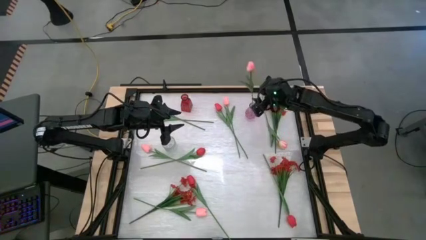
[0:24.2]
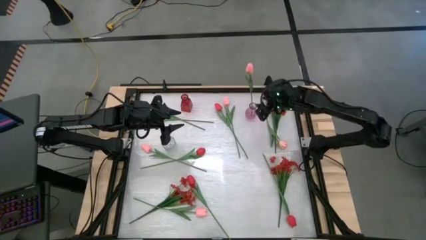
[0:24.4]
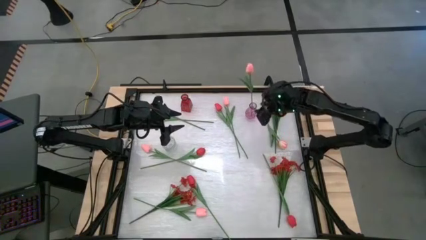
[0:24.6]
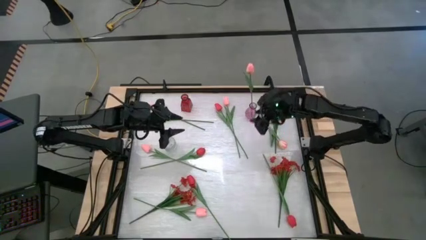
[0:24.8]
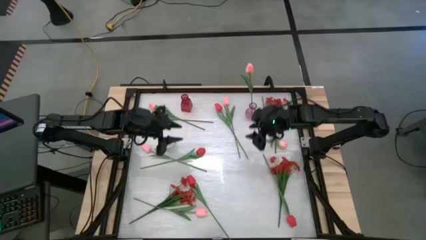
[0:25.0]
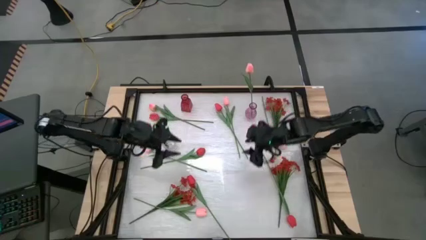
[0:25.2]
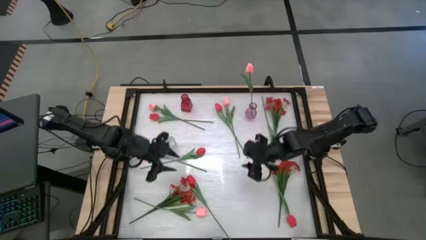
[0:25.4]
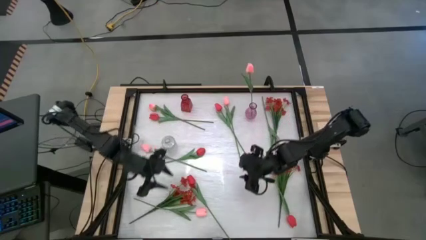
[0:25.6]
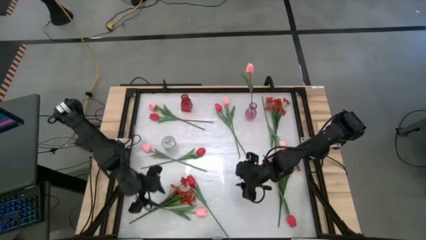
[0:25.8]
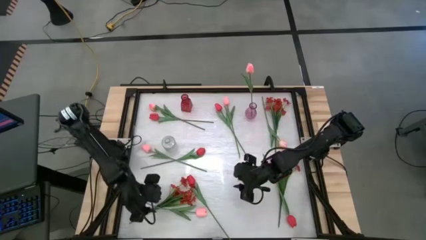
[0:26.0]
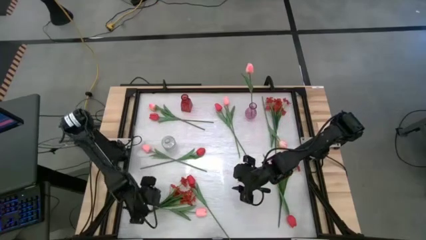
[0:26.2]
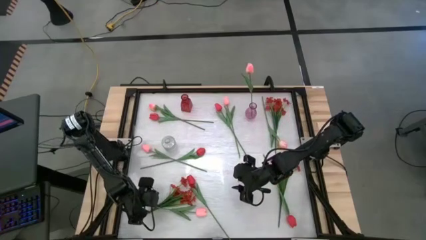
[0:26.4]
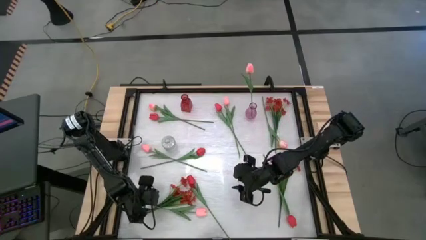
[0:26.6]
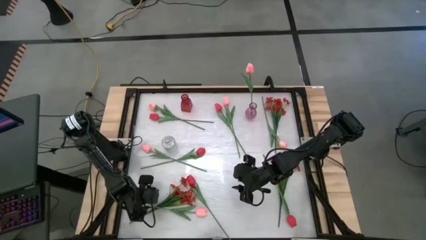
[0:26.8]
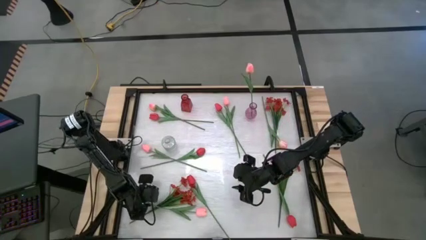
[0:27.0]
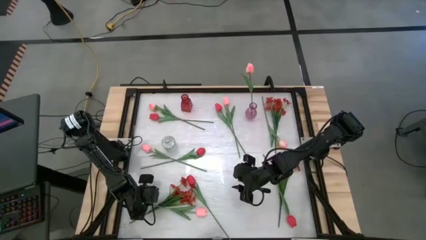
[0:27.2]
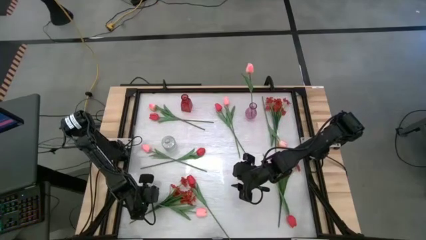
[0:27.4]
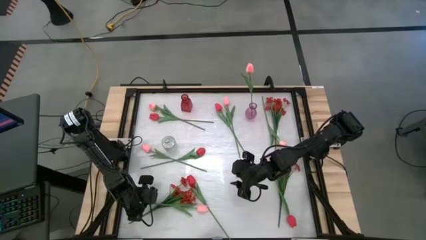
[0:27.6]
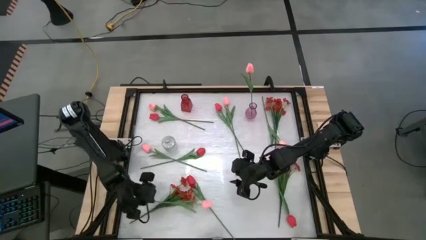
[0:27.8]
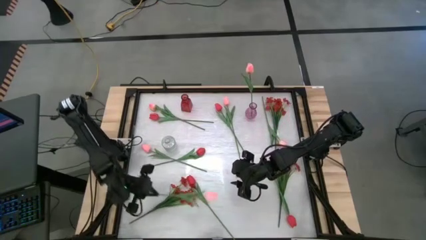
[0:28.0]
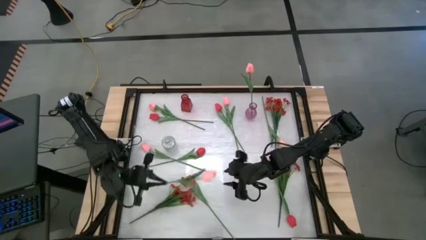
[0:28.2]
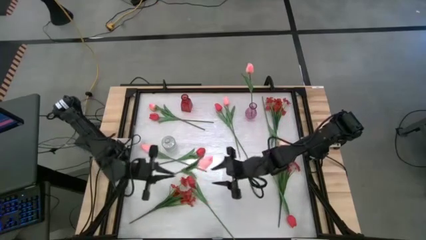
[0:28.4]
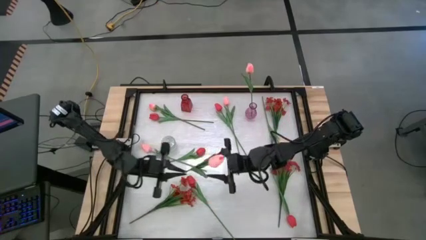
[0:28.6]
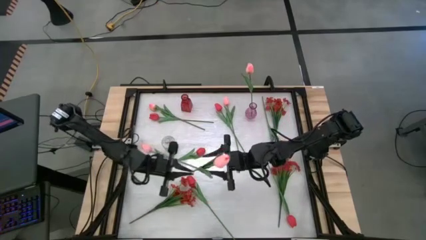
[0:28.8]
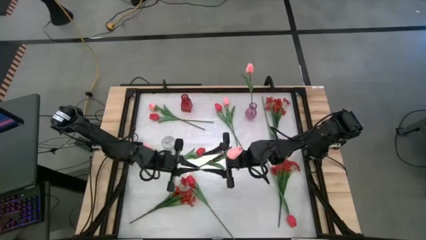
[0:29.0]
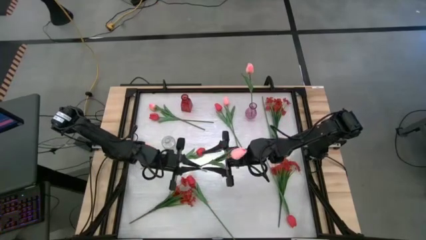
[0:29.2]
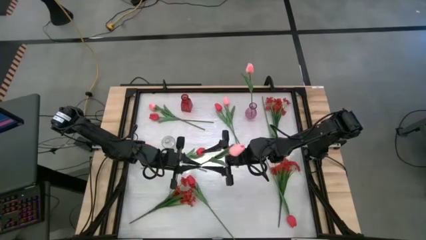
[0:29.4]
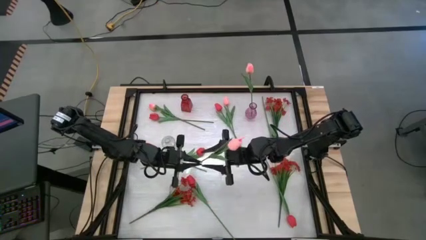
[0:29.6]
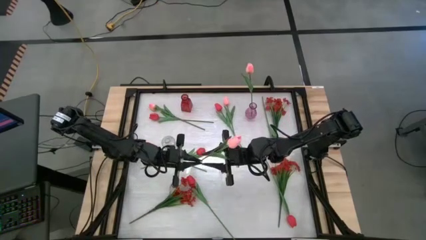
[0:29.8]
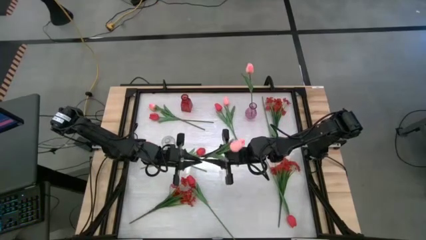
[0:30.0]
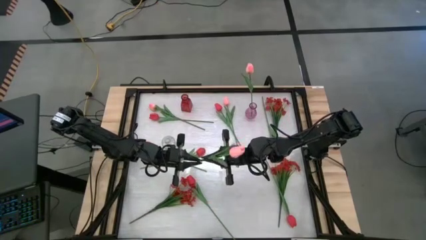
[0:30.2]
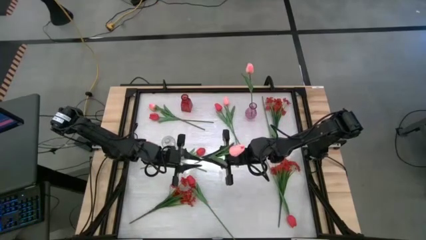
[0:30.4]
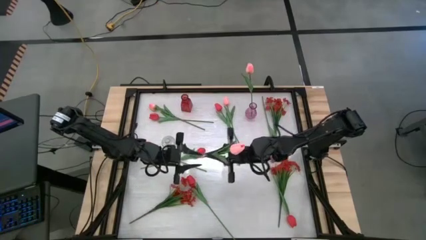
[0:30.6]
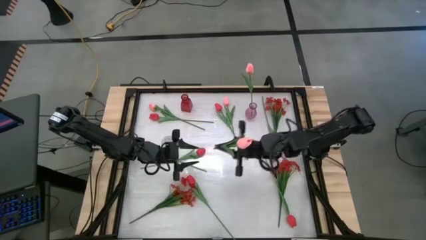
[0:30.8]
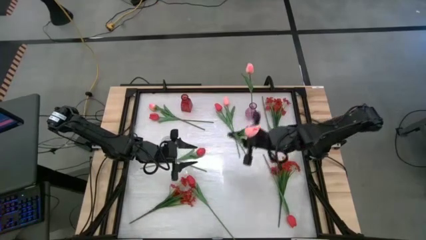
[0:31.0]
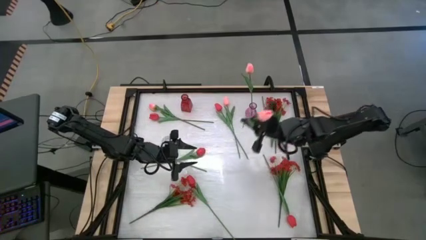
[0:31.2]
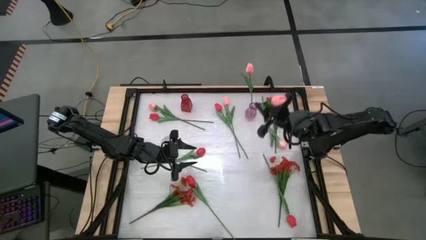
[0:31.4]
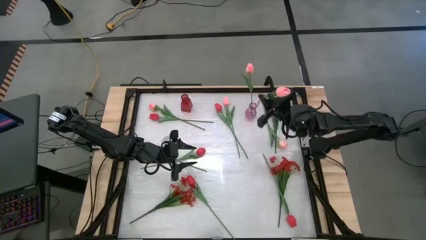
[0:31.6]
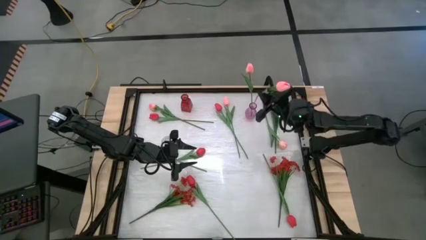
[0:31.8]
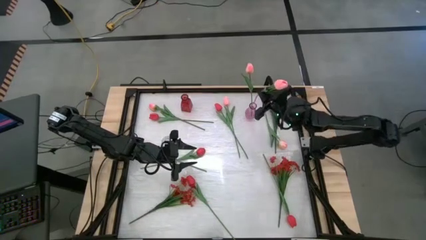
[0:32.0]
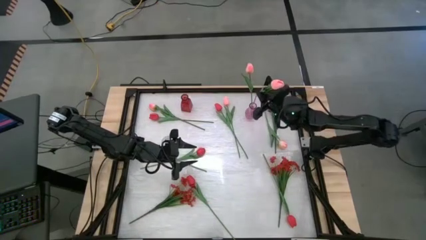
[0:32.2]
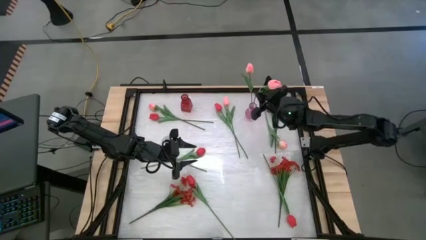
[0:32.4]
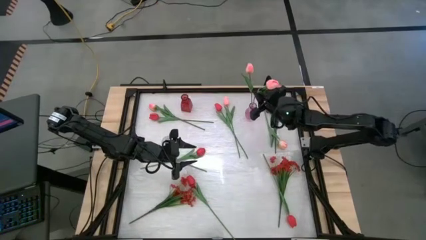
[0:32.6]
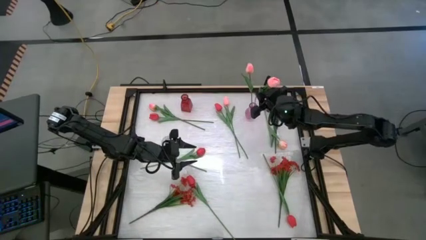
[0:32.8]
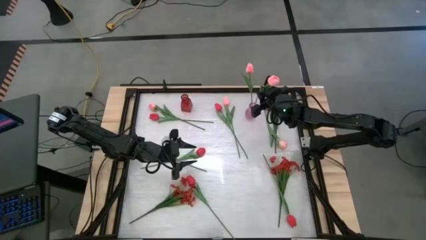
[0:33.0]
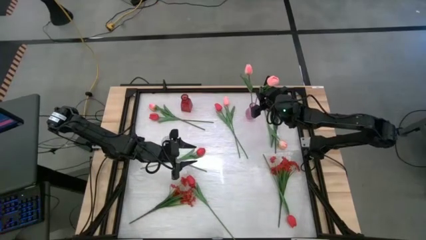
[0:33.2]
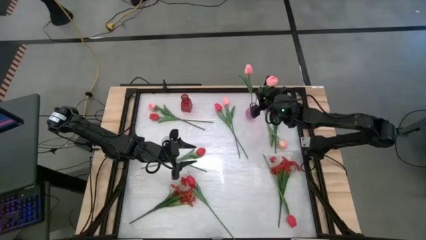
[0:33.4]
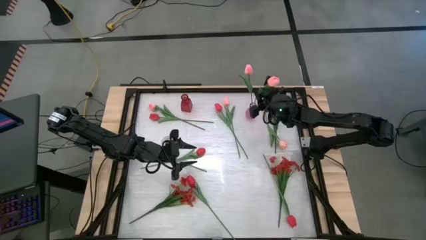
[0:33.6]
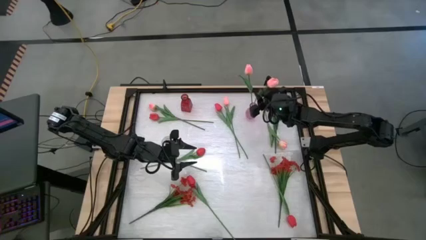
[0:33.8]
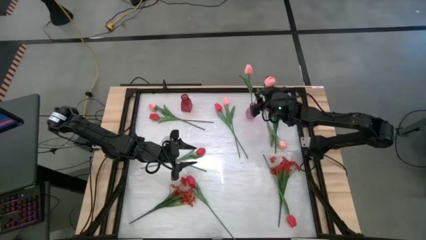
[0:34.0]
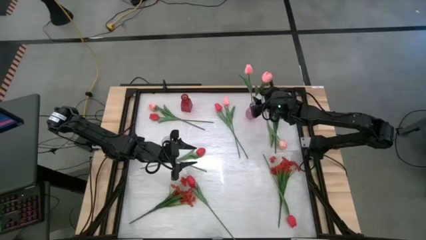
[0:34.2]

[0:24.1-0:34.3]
Task: Sort flowers into vase by color
Put the pink tulip into the purple vase

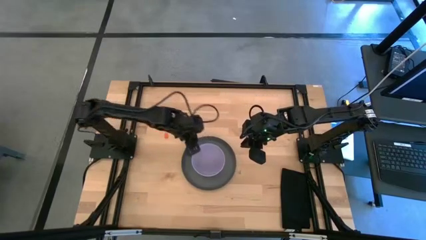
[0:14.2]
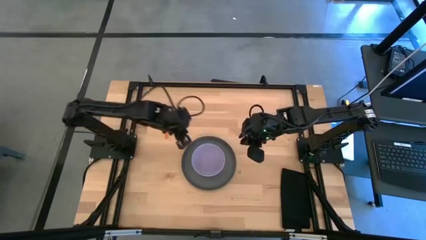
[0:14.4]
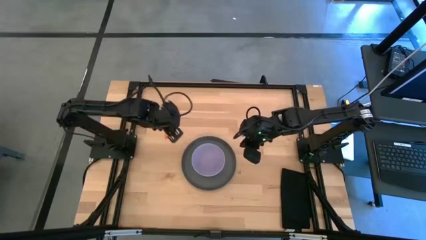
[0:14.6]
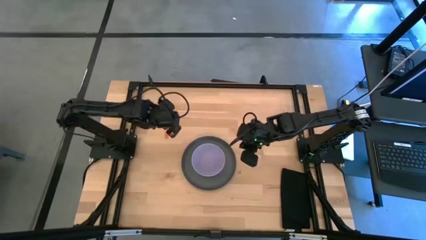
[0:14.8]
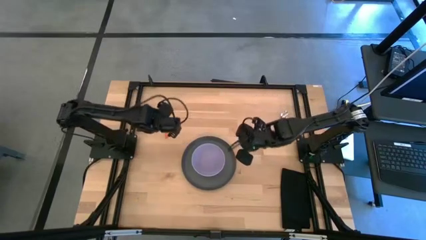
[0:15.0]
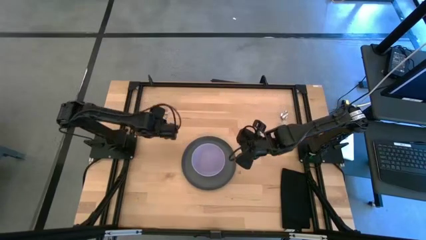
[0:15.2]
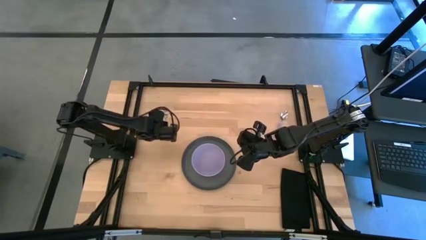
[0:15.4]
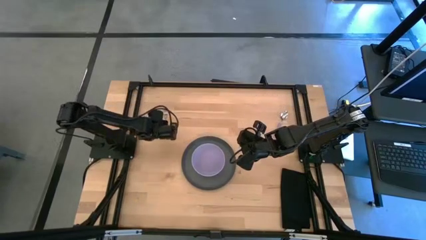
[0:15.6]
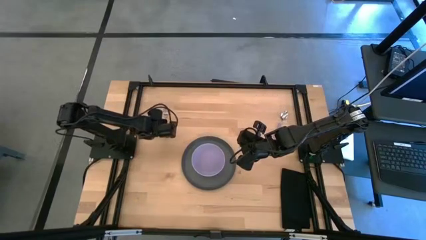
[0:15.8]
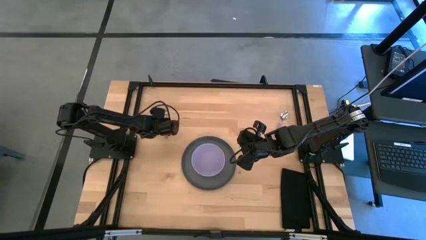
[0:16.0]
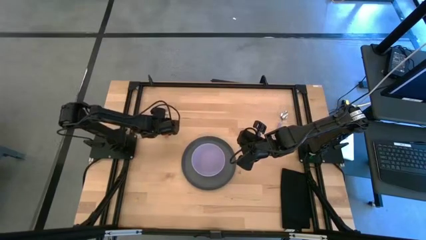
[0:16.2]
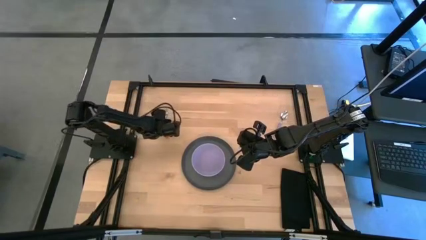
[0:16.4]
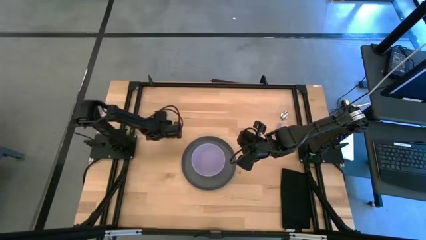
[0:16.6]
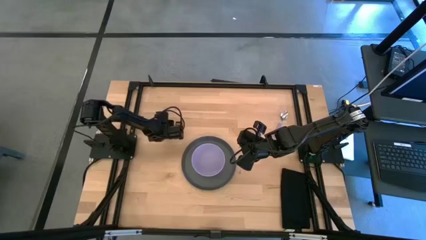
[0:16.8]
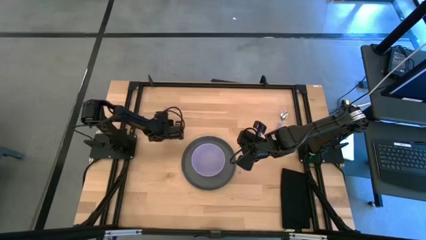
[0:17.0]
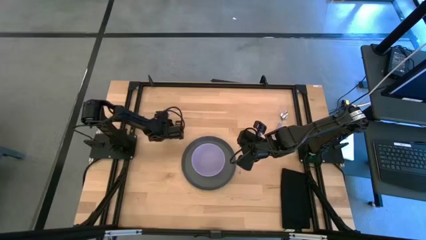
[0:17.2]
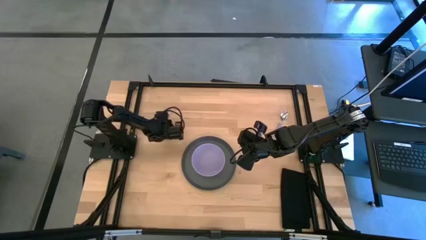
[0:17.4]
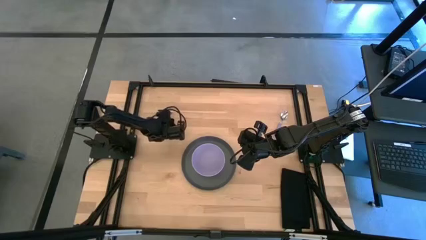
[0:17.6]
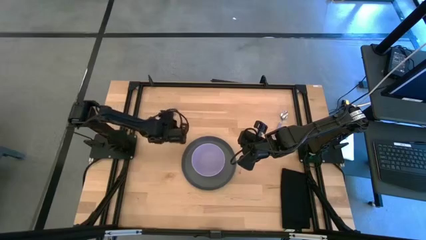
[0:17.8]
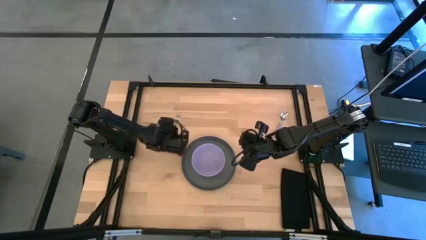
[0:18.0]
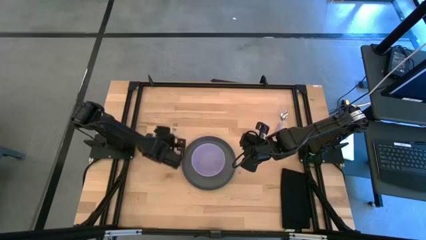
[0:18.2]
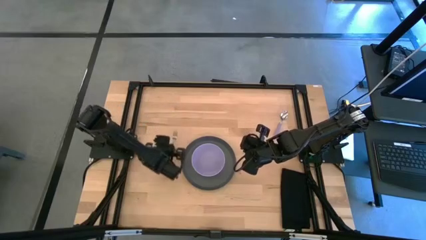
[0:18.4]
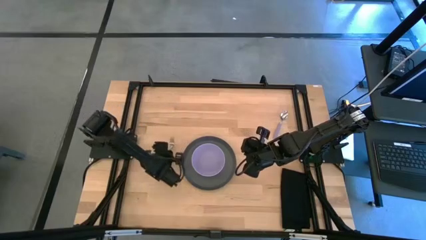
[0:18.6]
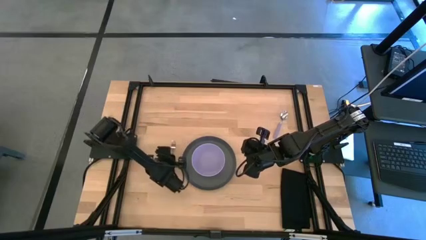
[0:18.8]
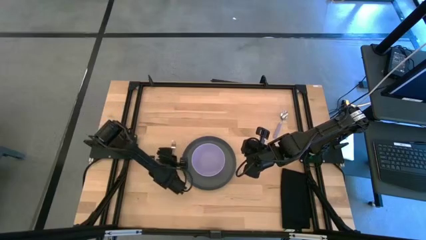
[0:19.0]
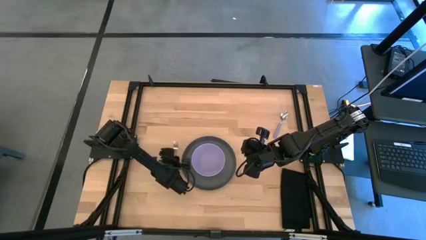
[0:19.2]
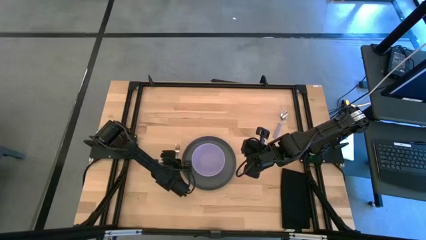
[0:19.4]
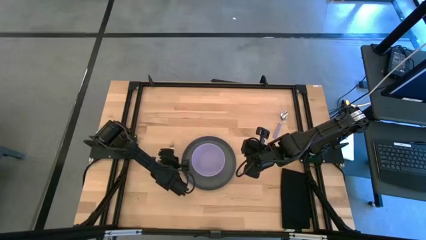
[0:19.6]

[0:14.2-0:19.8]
Task: Set table place
Put the orange fork to the right side of the grey plate
